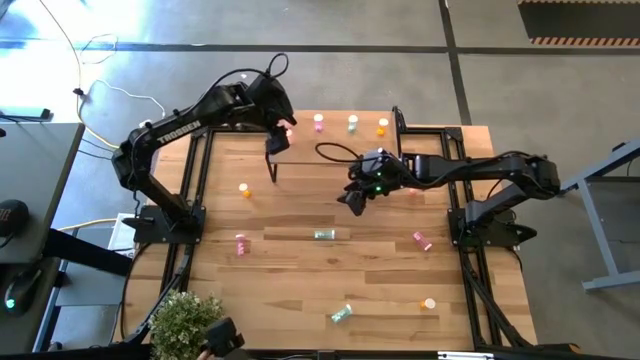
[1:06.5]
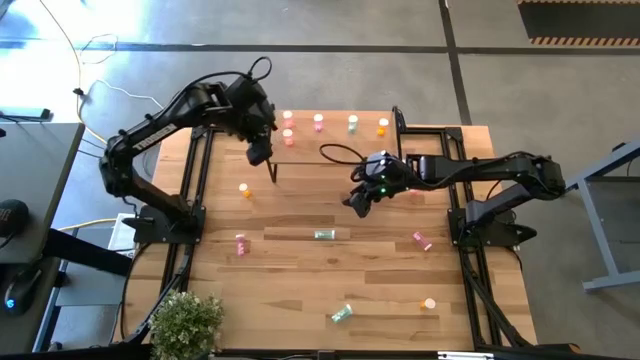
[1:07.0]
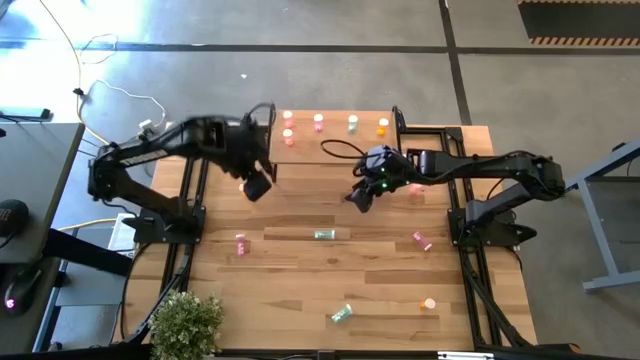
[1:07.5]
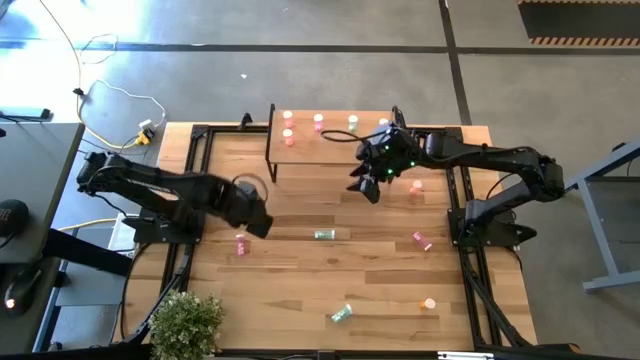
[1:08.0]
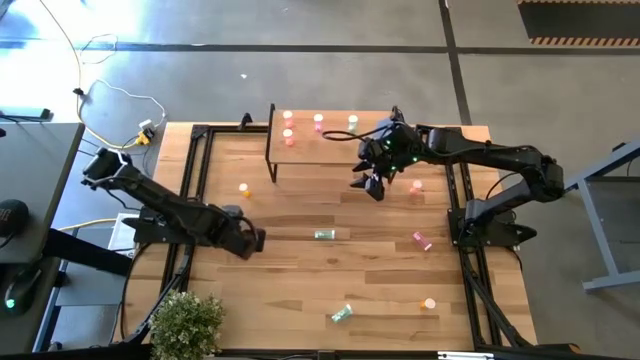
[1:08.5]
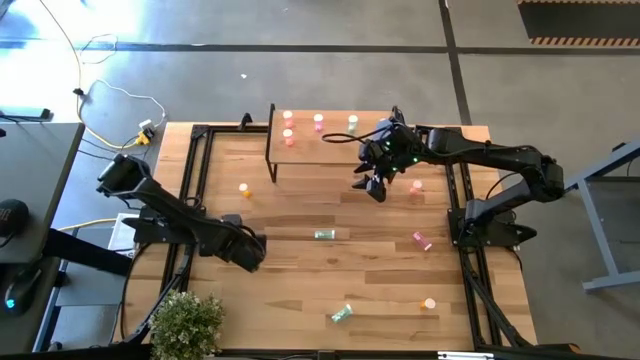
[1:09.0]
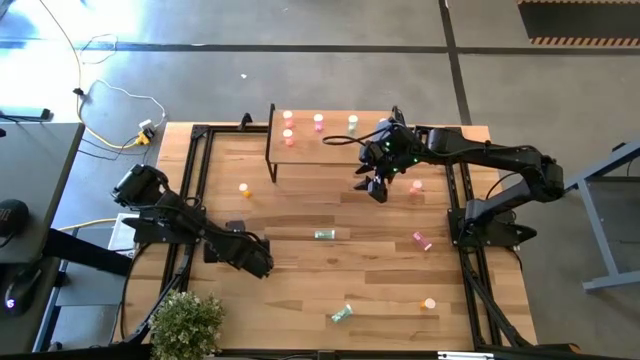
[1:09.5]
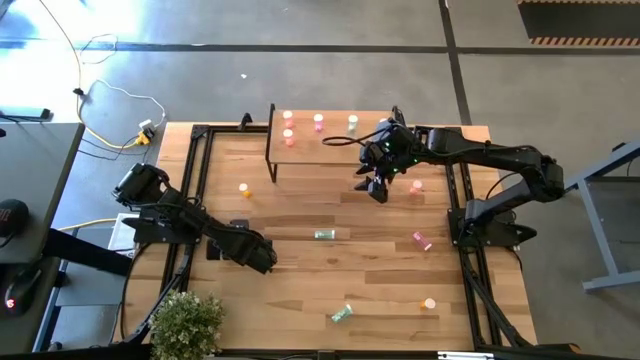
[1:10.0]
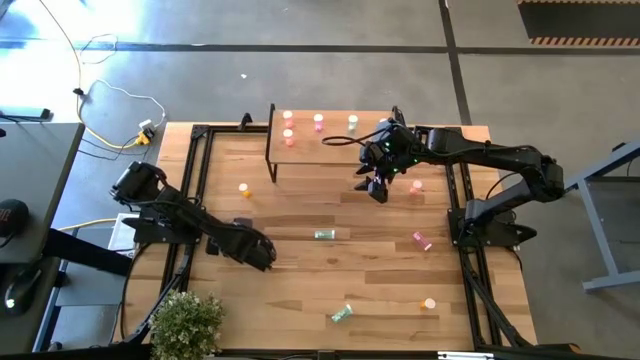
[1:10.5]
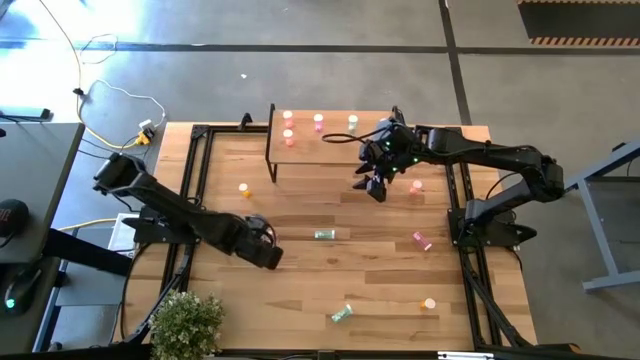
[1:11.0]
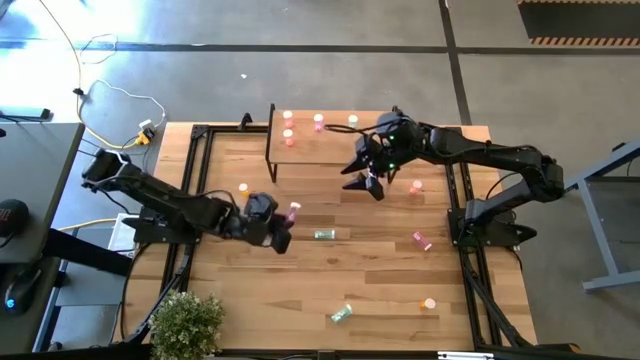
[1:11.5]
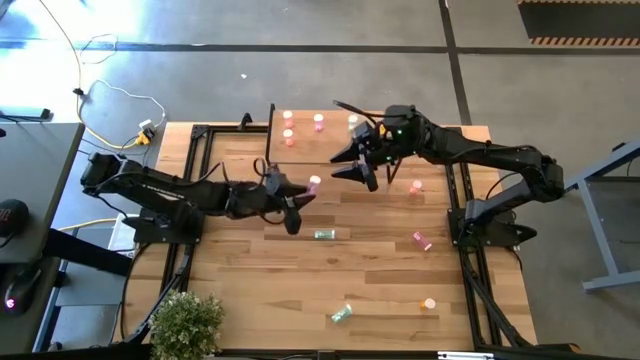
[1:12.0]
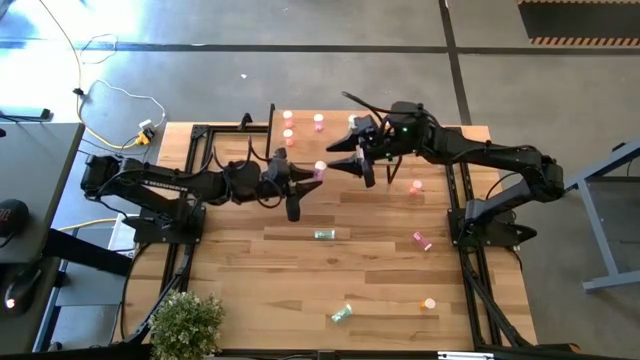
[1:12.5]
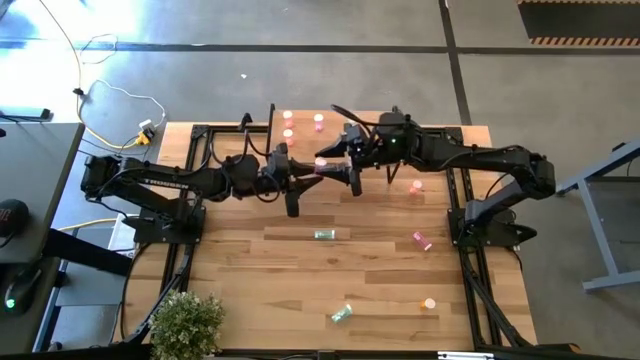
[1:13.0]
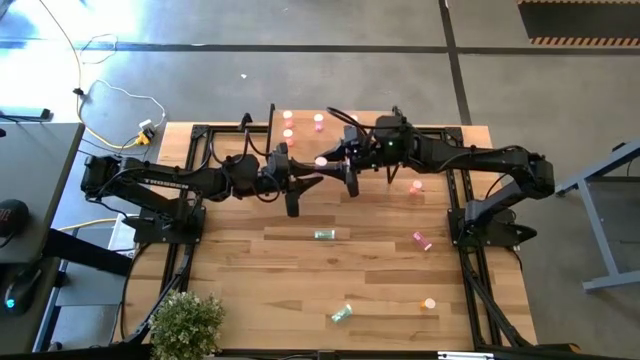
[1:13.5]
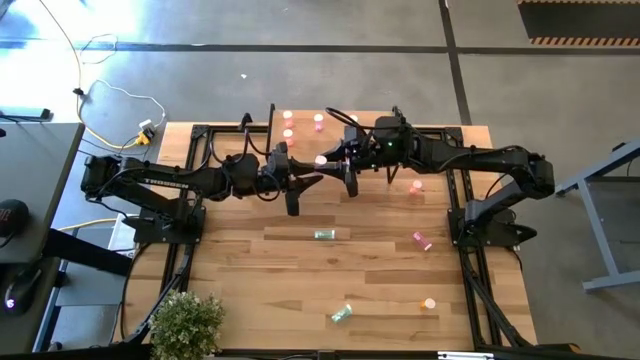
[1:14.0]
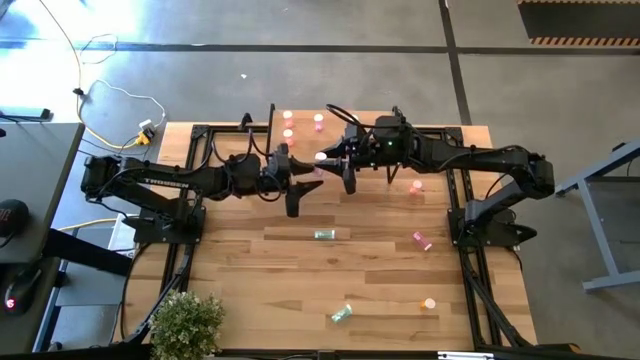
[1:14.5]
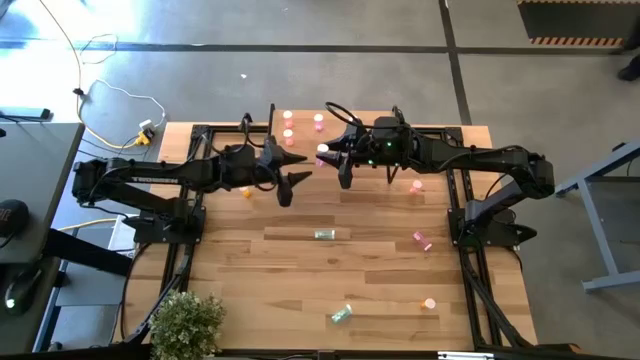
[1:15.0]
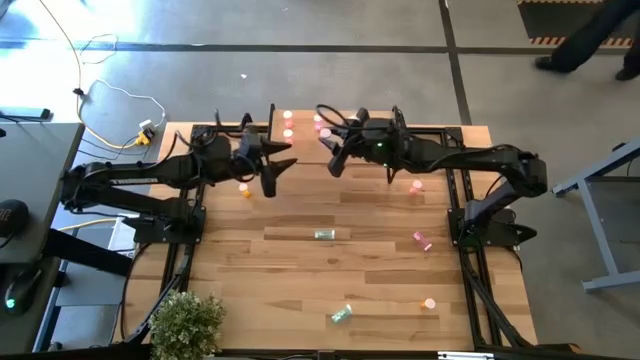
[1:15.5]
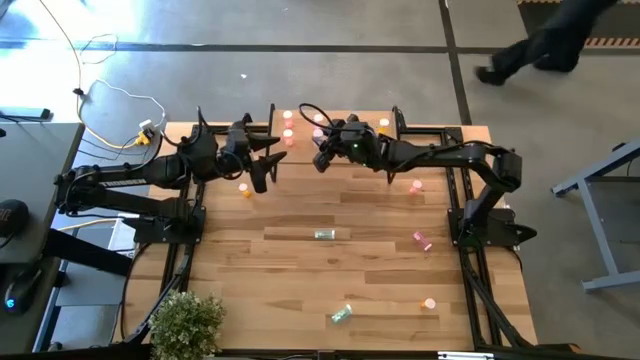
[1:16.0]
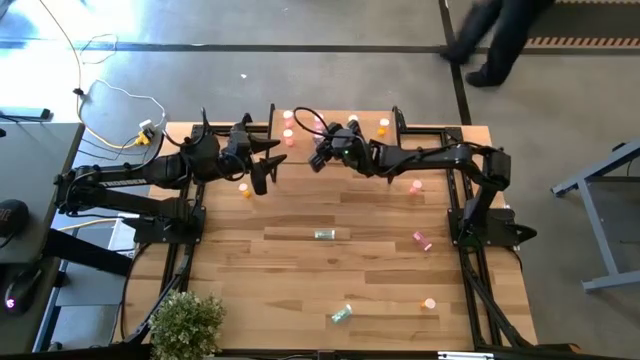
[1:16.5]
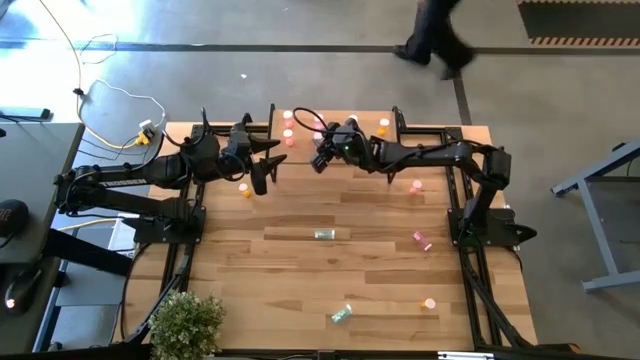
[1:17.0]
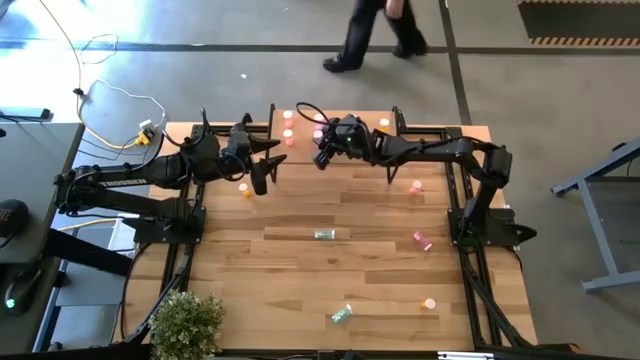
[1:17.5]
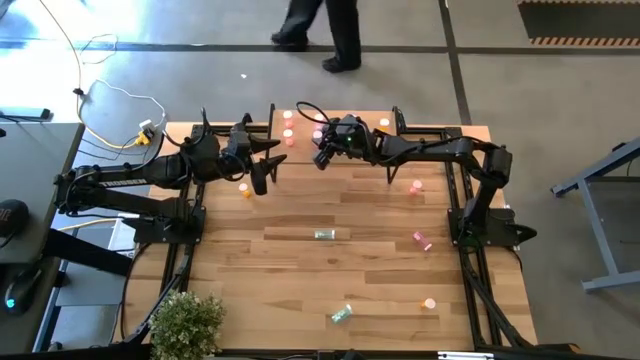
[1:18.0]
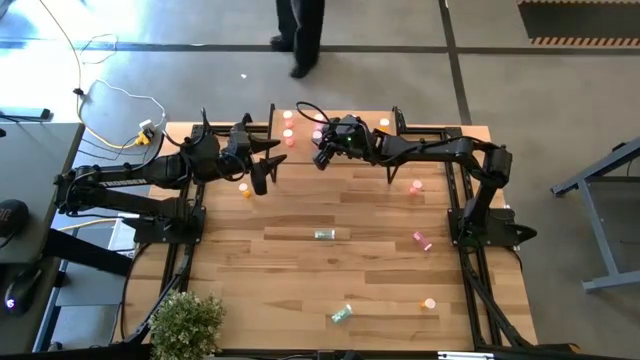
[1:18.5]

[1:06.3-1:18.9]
Task: Pick and place medicine bottles onto shelf by color
Put the left violet pill bottle on the shelf aligned with the other violet pill bottle

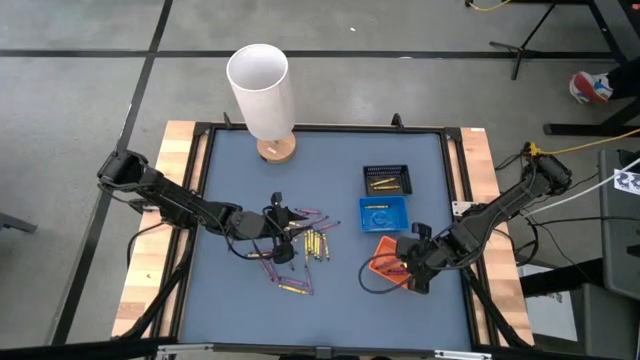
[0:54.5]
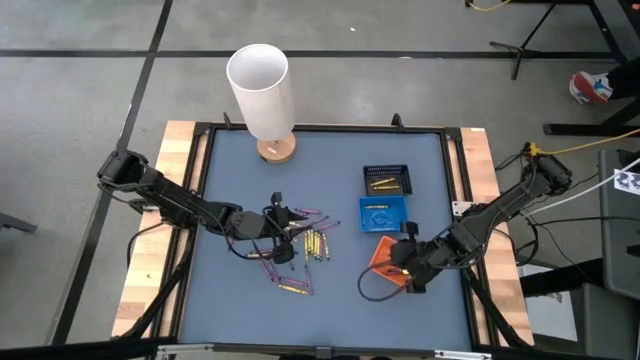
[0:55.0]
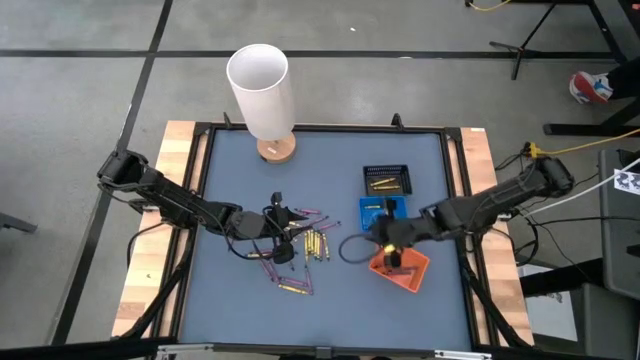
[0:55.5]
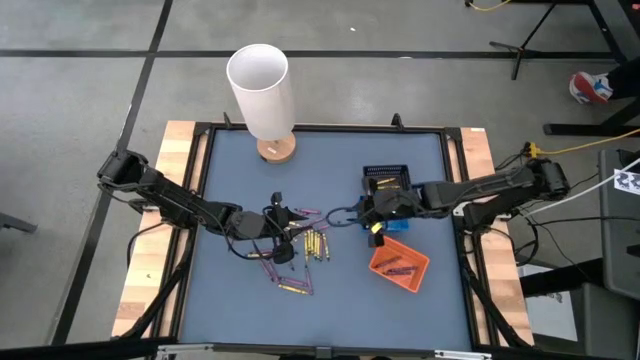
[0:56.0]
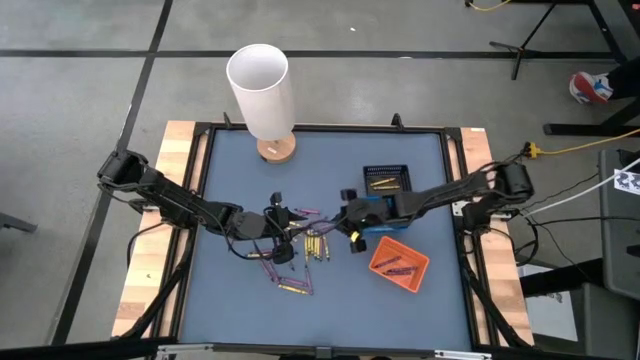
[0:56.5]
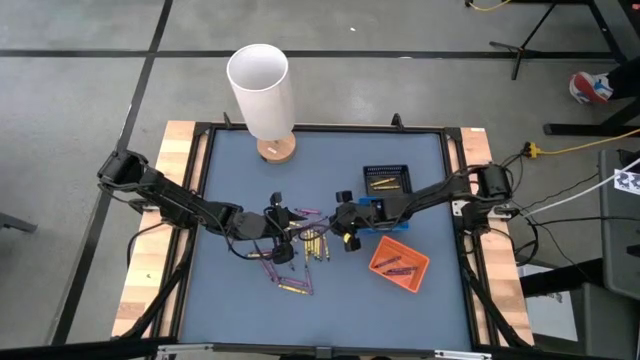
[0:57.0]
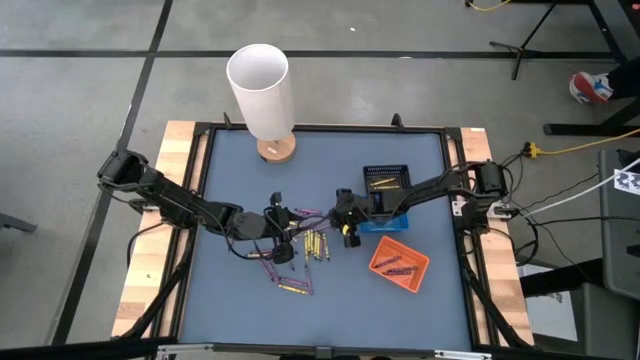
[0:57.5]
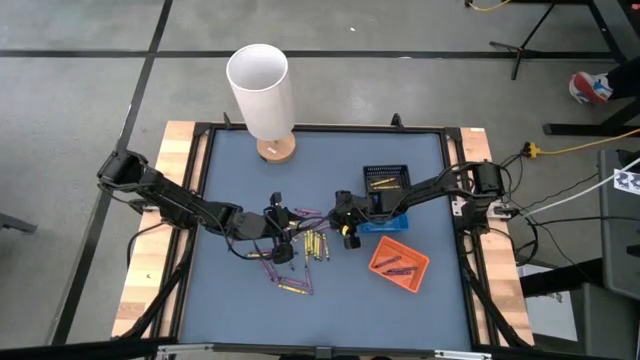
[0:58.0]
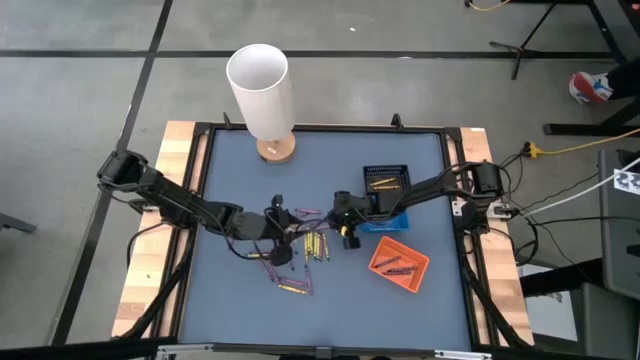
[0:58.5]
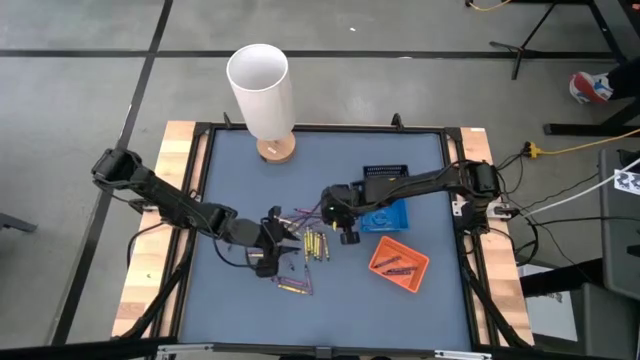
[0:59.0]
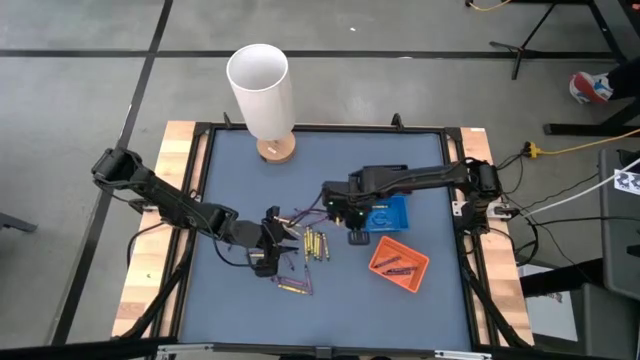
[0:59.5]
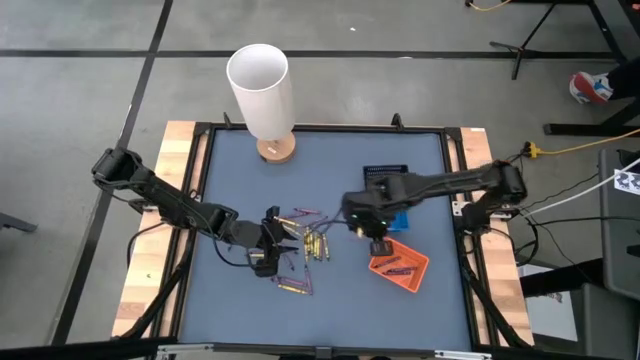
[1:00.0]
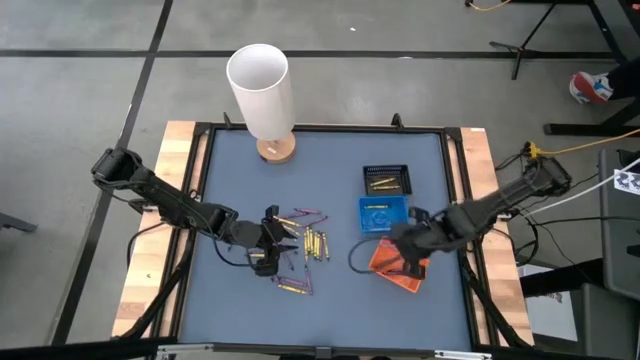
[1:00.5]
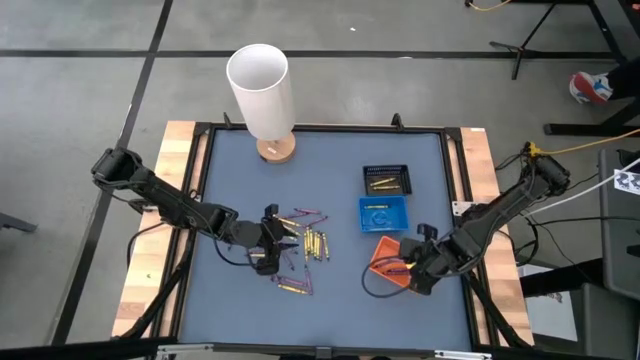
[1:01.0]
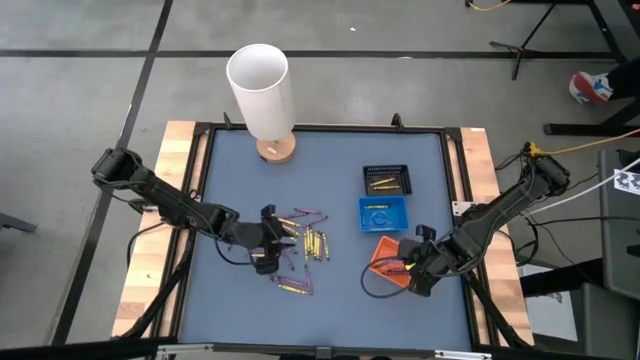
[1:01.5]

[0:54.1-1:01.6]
Task: Sort crayons
Put the purple crayon into the orange bin

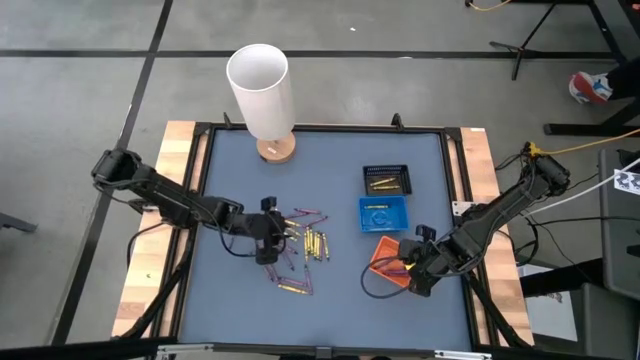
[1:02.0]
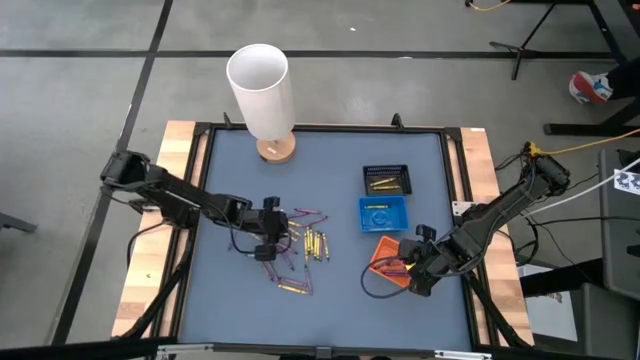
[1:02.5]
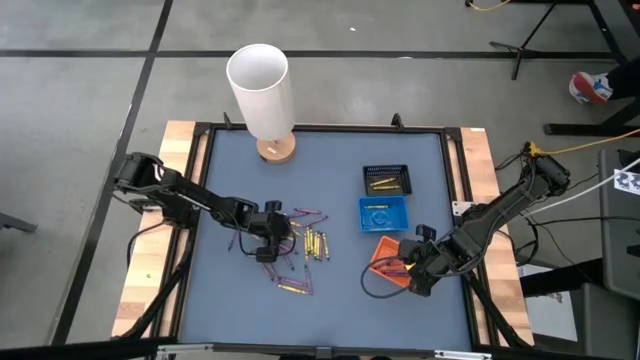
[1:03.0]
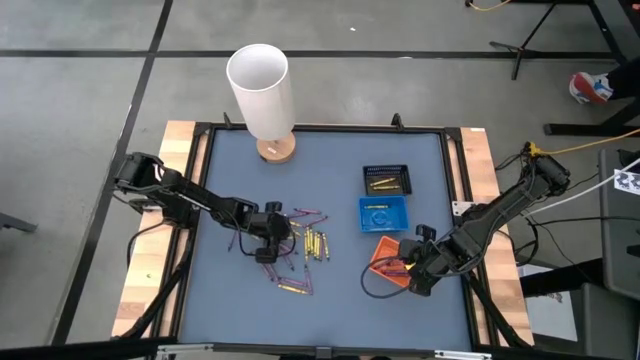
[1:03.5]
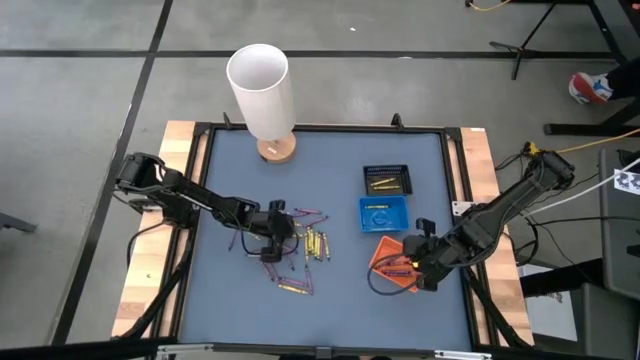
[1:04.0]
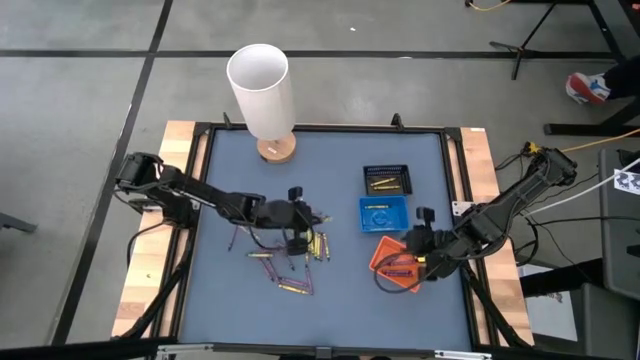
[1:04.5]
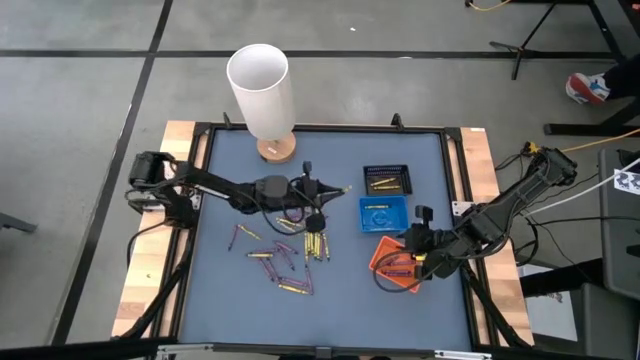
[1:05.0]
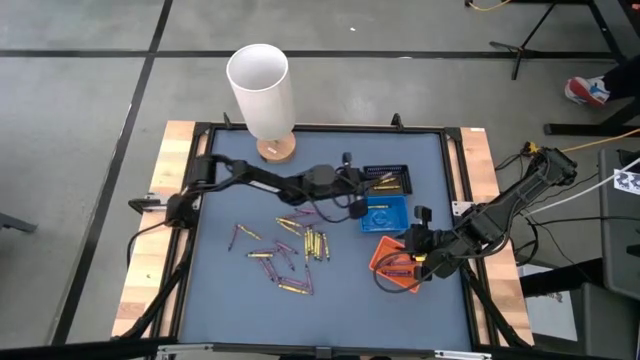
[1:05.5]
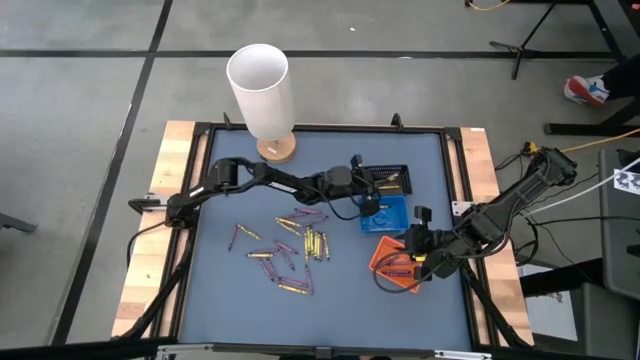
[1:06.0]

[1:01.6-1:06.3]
Put the yellow crayon into the black bin
